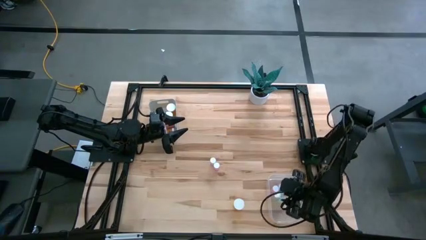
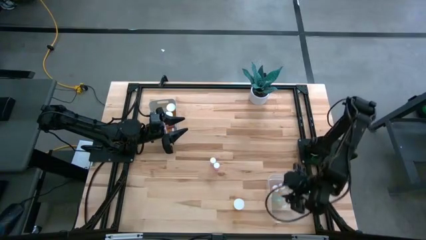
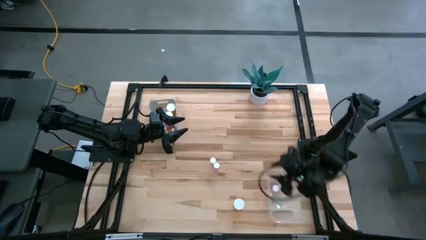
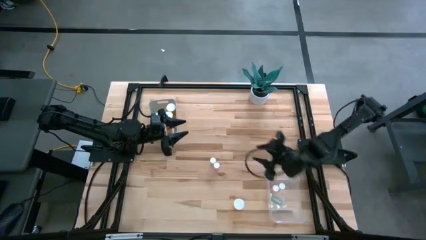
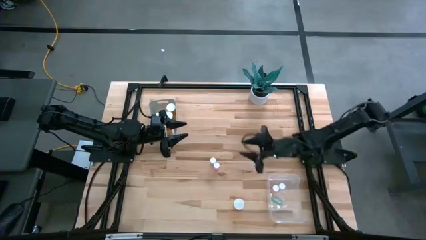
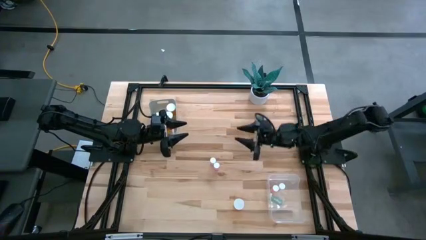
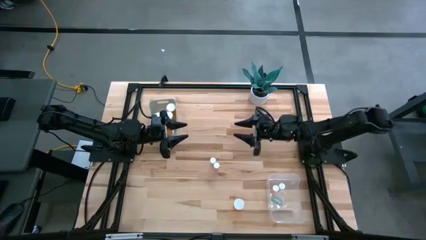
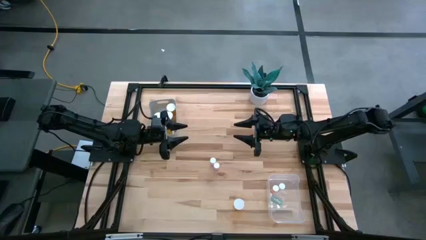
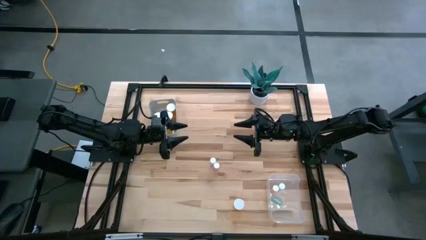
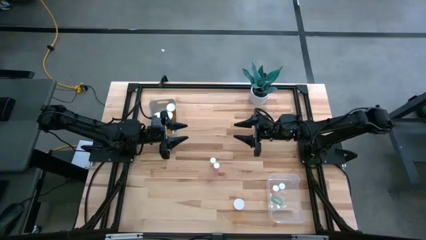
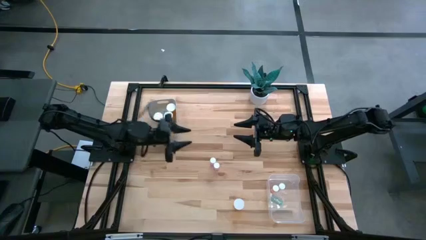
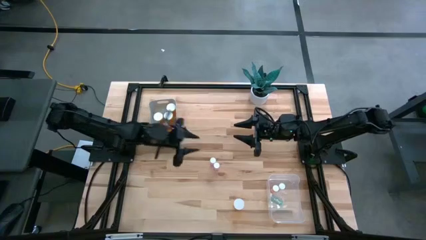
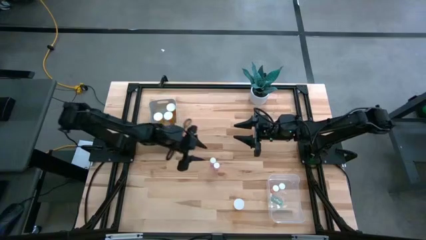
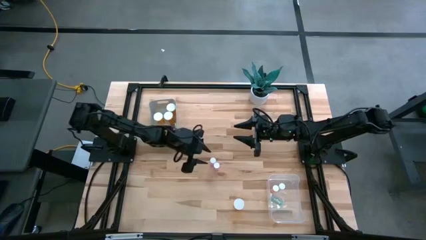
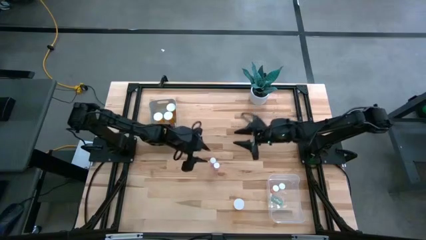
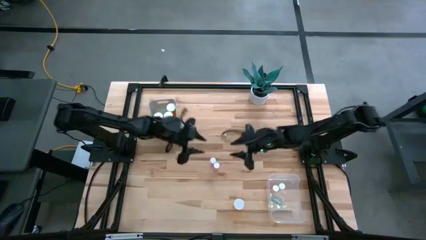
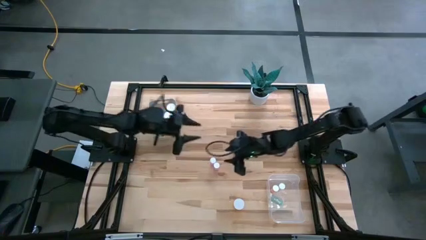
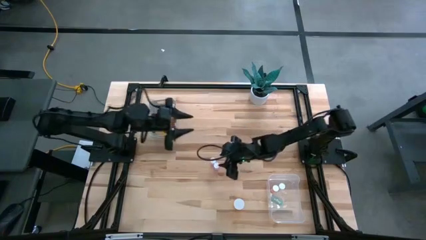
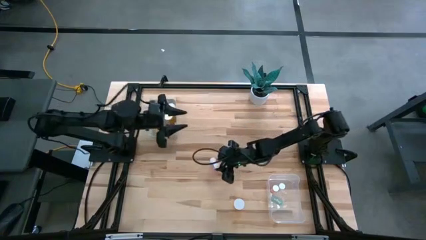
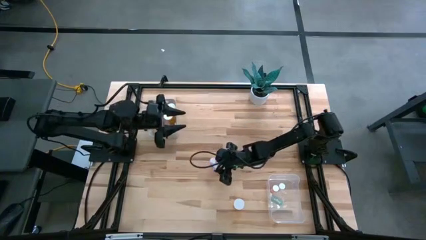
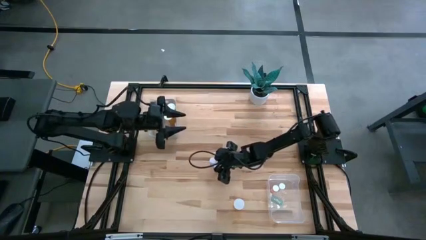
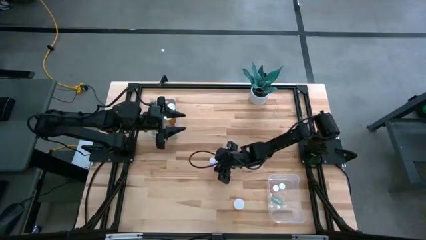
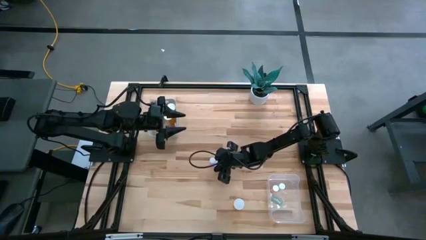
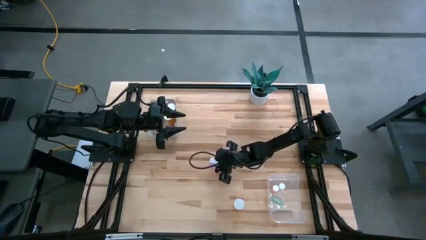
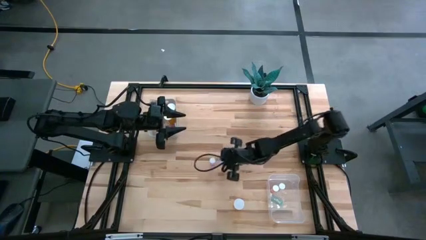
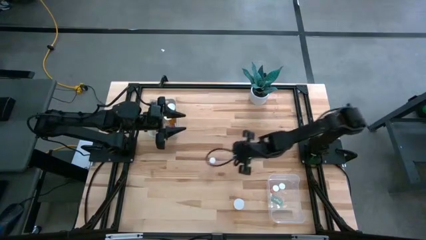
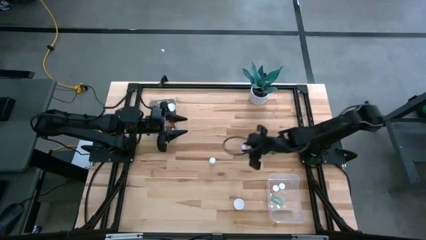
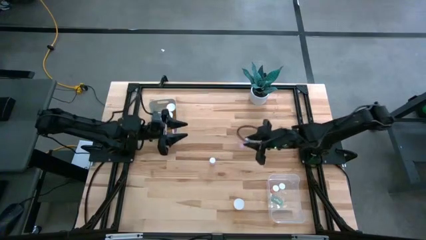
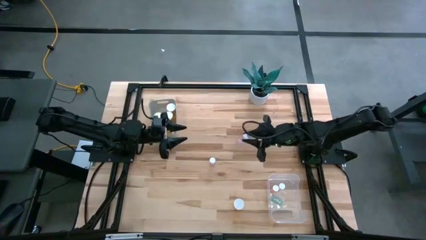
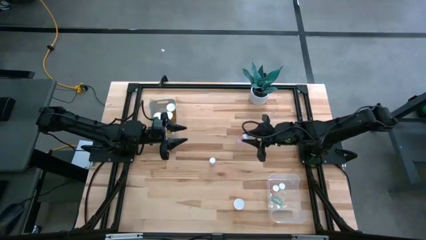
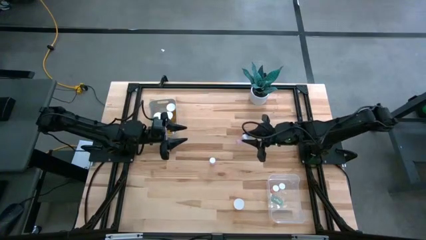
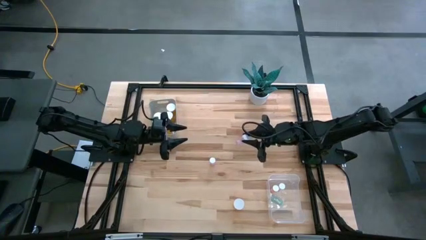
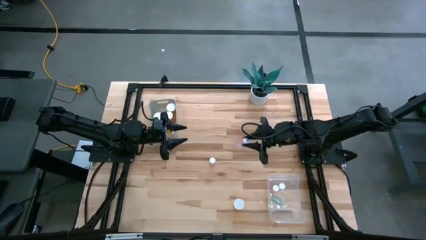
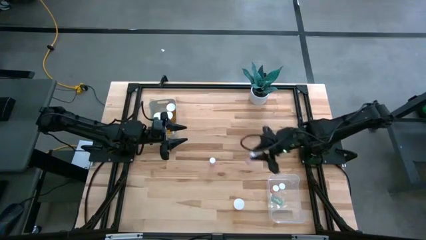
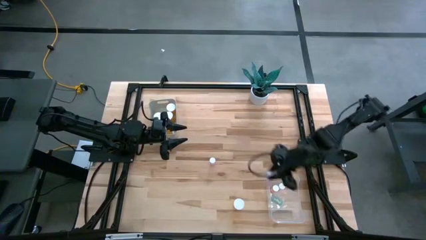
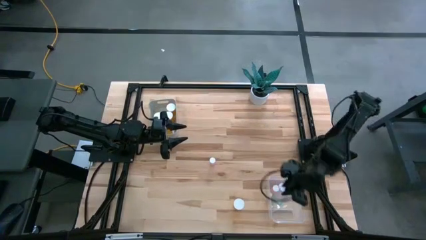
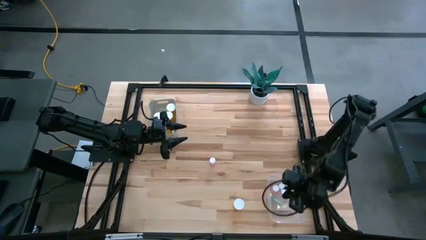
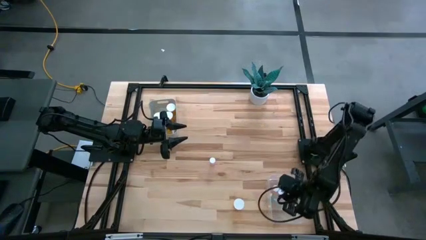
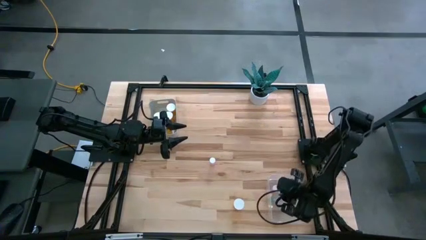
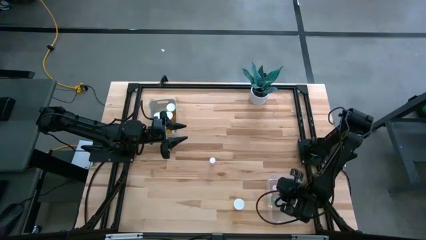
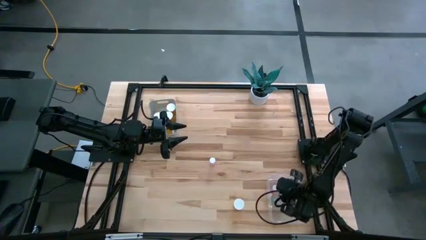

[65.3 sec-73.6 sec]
Task: Pick and place medicine bottles into bin by pill shape (circle, oval)
Put the bottom pink tablet bottle into the transparent bin

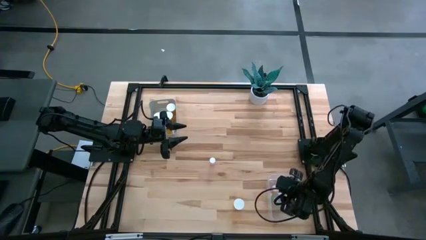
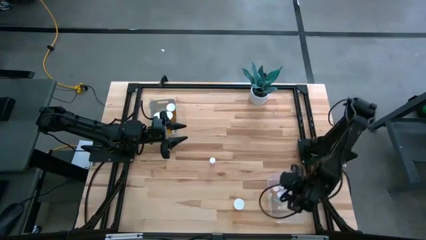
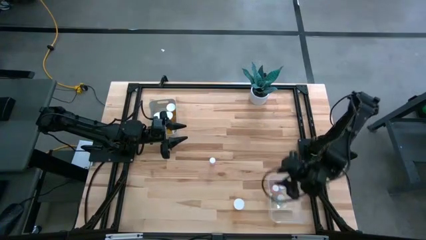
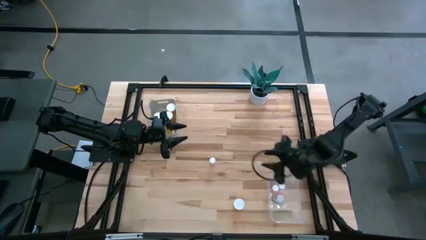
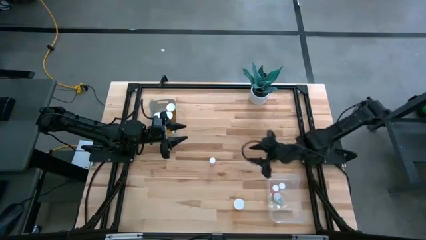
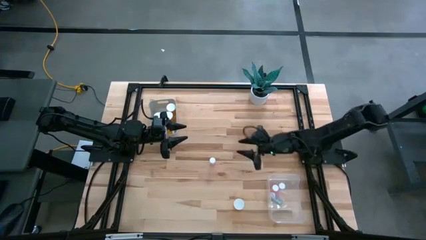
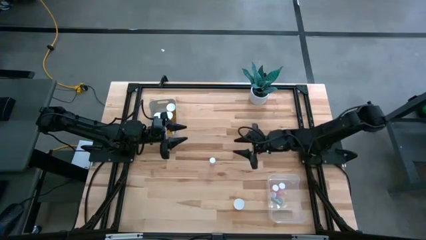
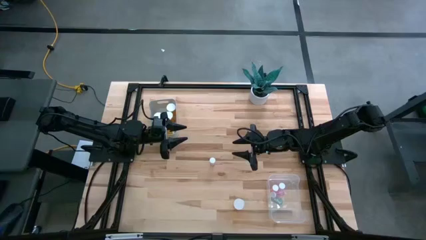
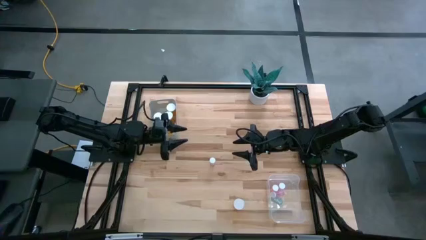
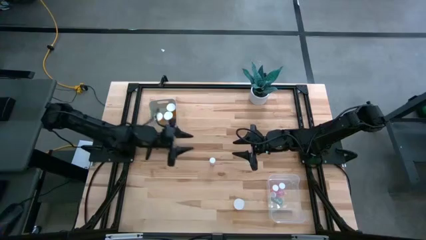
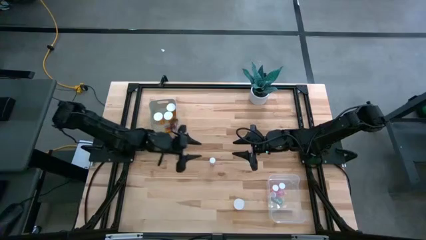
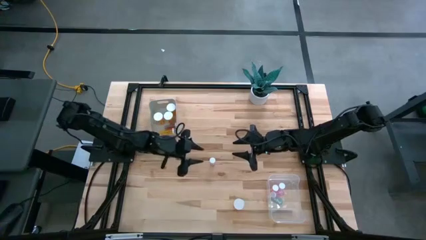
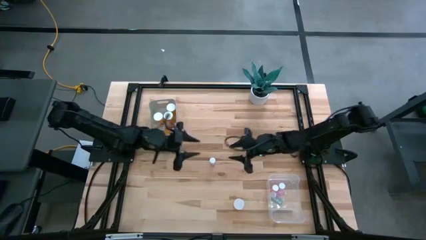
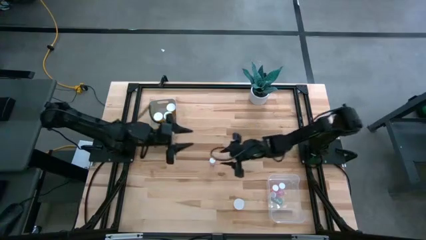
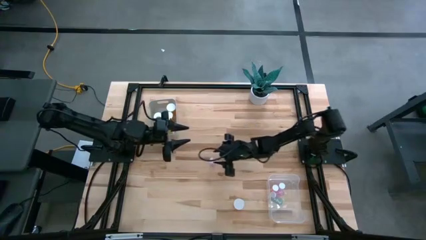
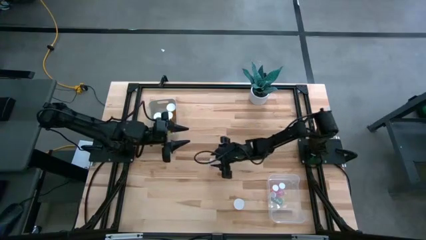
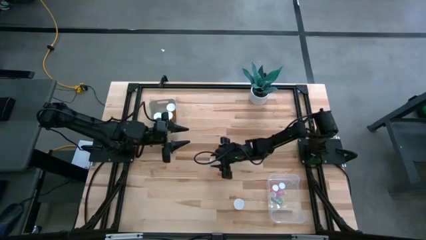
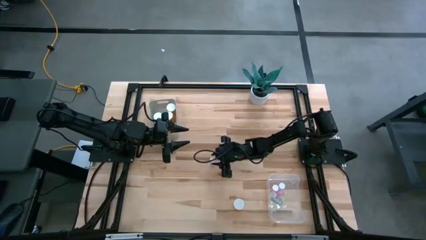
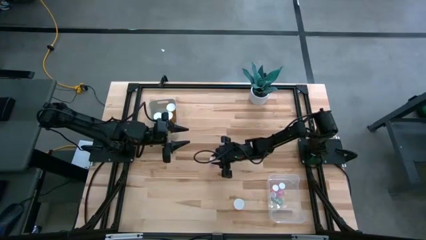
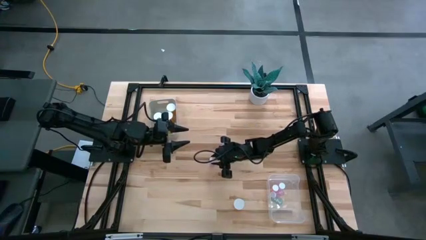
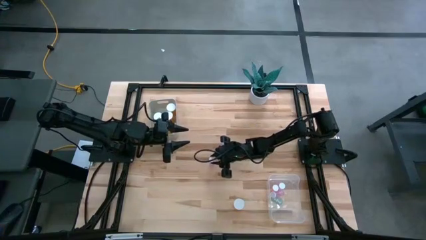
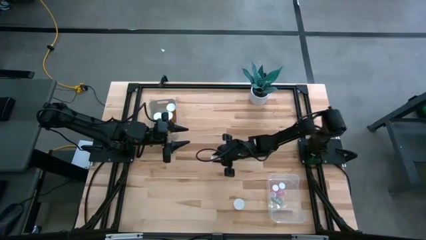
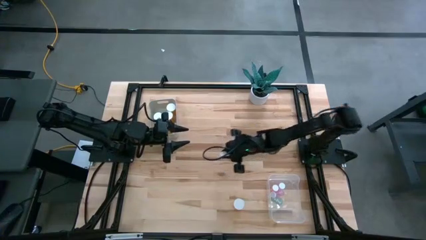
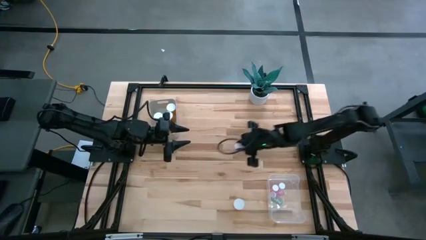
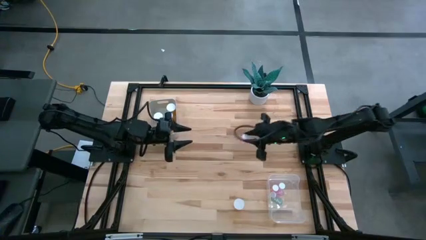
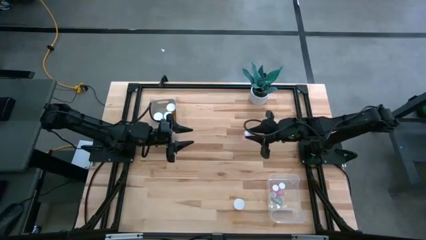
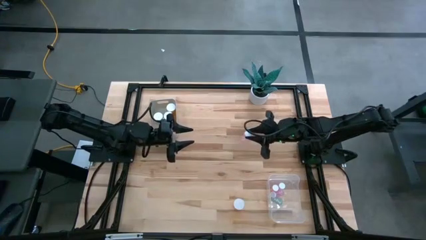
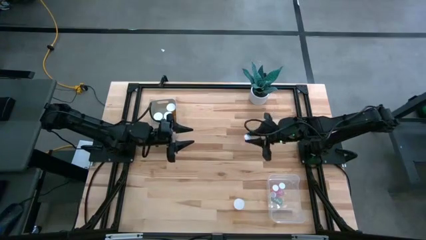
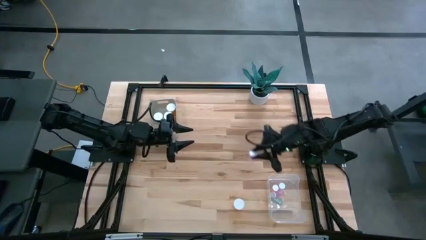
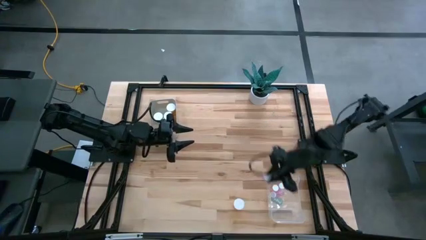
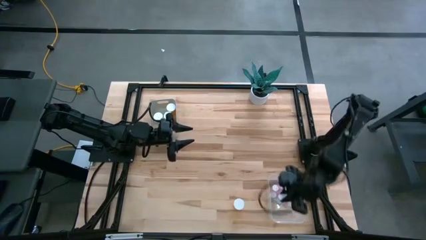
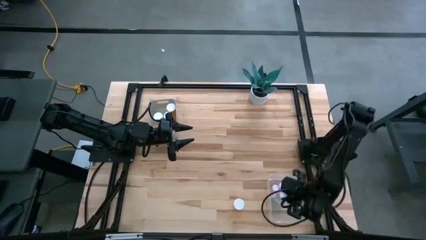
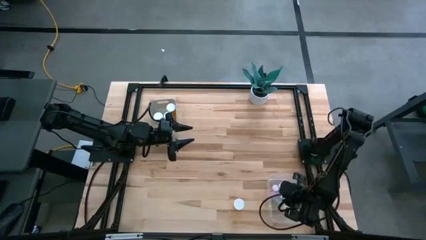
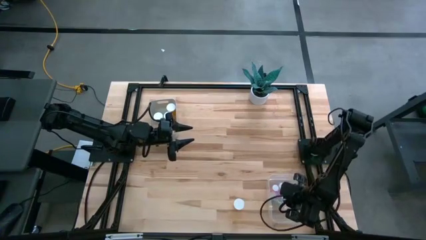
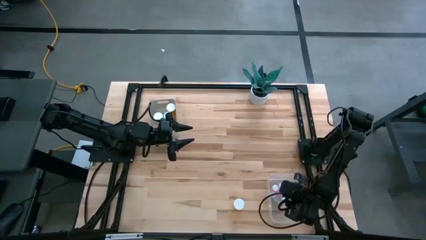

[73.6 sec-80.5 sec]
Put the pink tablet bottle into the transparent bin

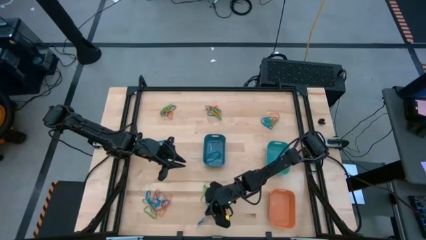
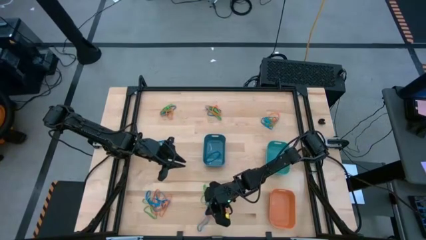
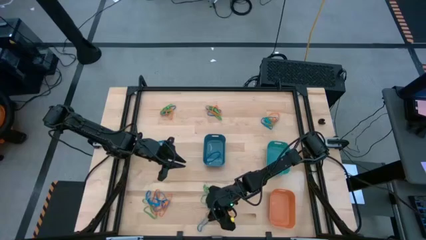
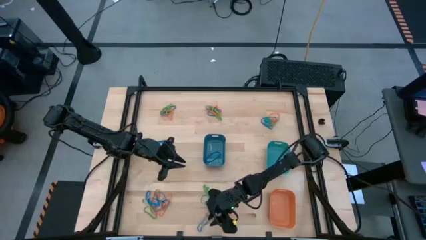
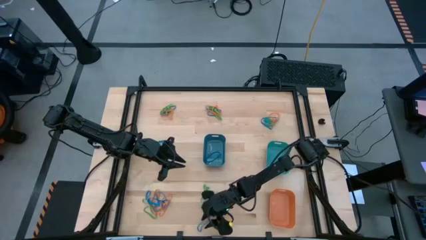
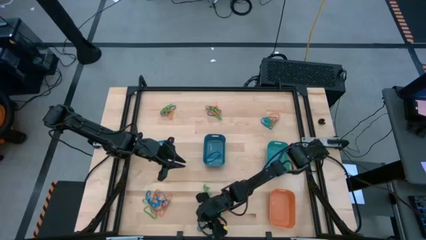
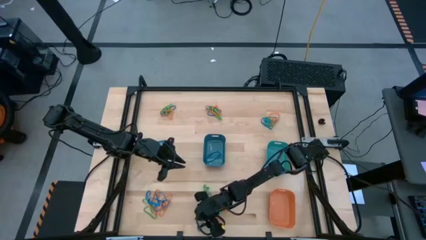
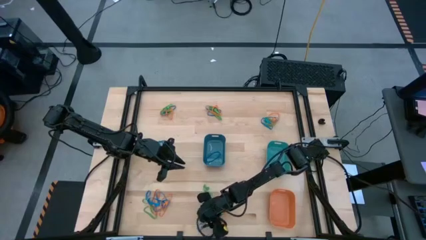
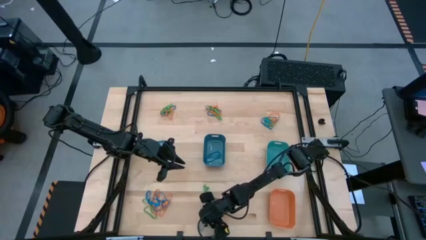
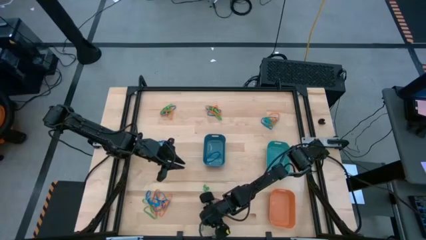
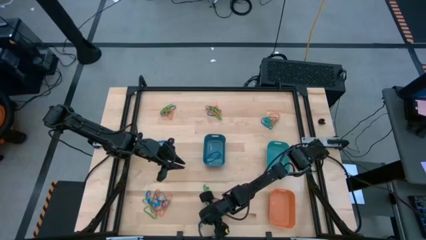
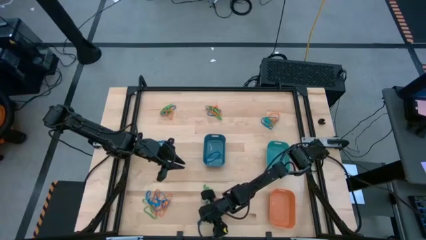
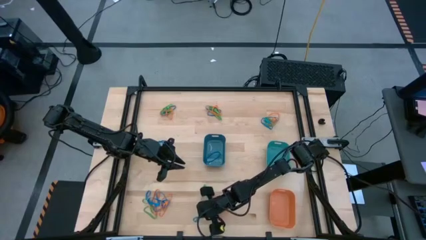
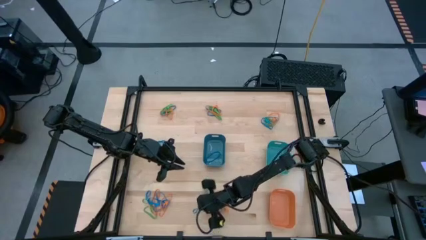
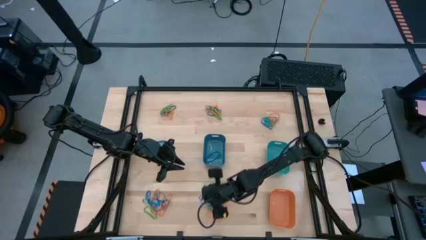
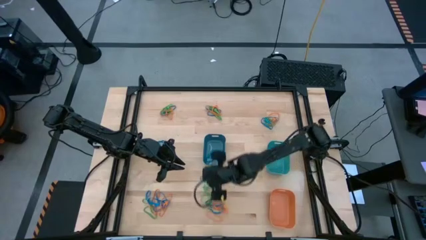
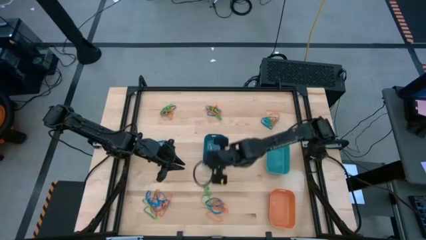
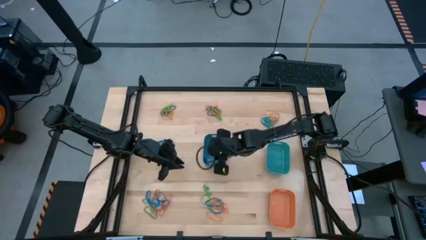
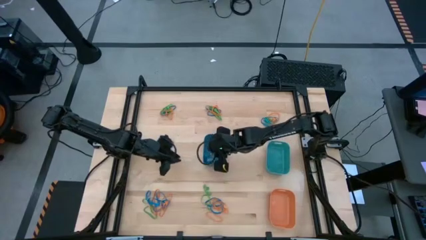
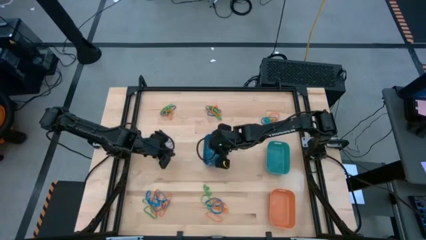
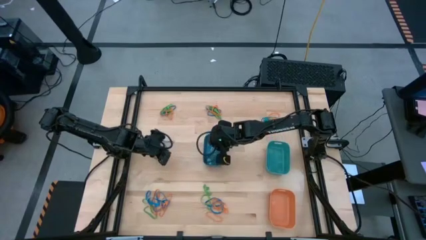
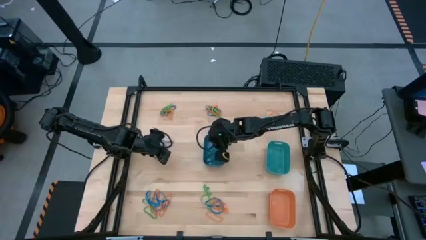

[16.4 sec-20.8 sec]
Task: Sort rubber bands into baskets
Put the blue rubberband into the blue bin
